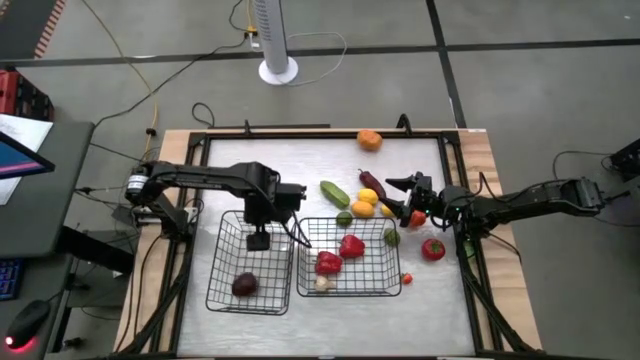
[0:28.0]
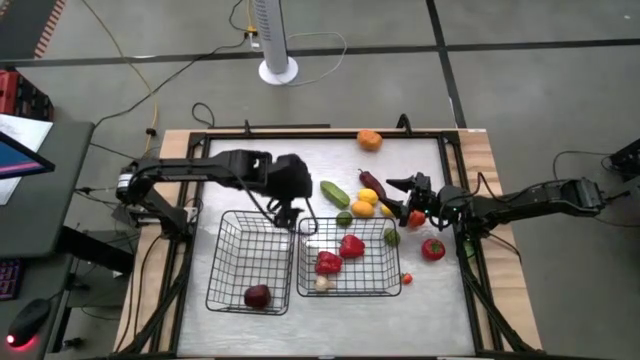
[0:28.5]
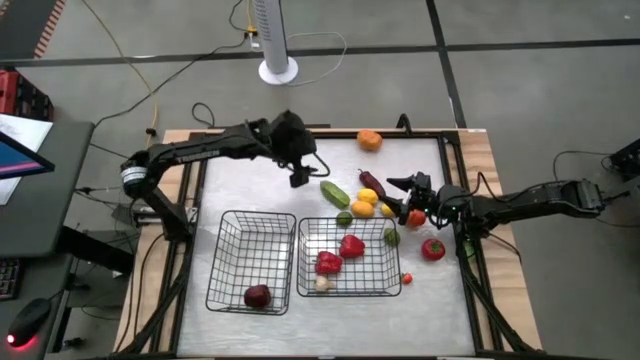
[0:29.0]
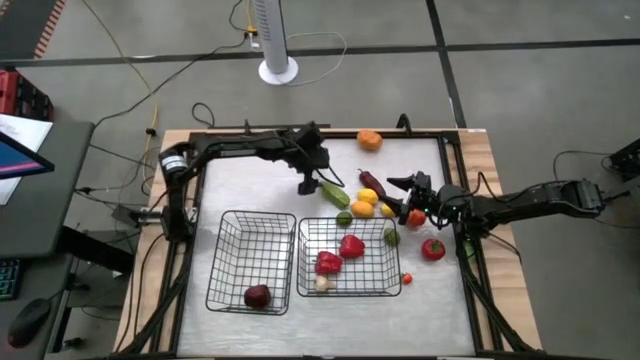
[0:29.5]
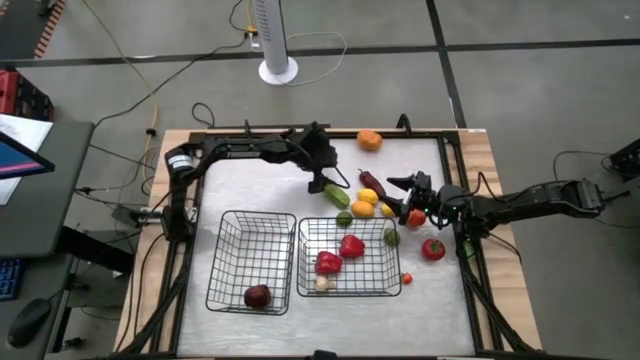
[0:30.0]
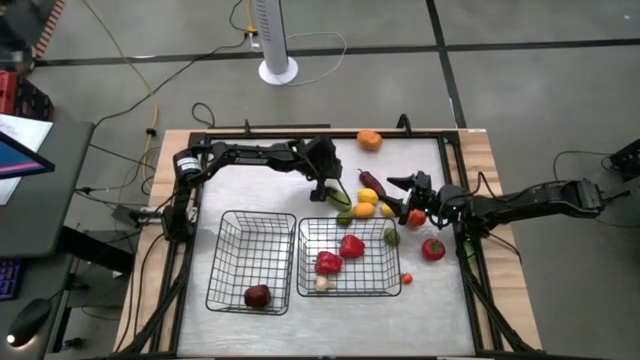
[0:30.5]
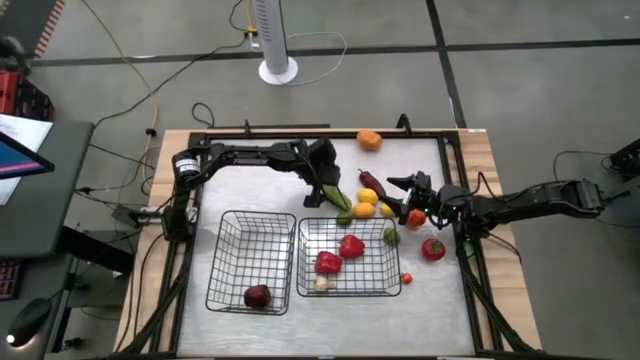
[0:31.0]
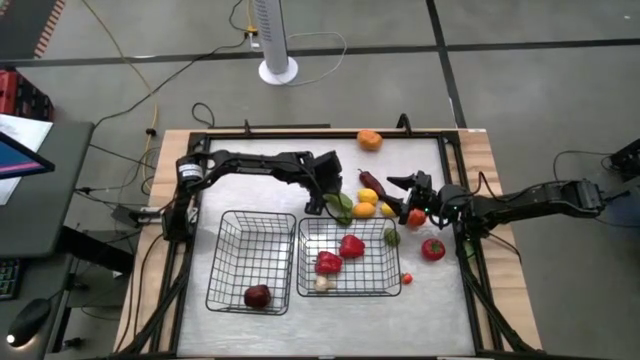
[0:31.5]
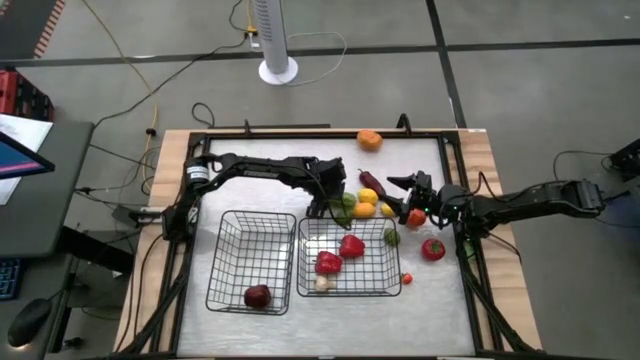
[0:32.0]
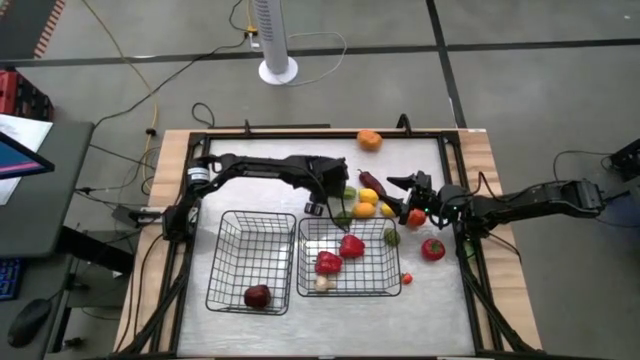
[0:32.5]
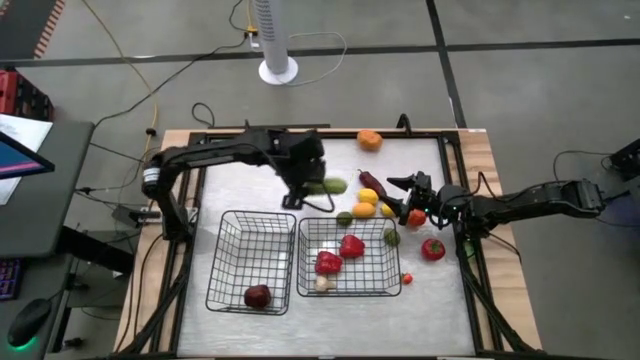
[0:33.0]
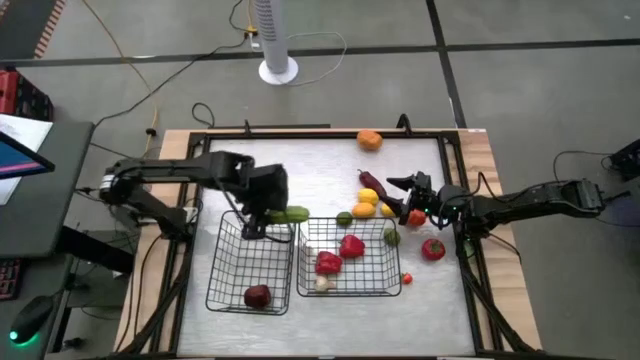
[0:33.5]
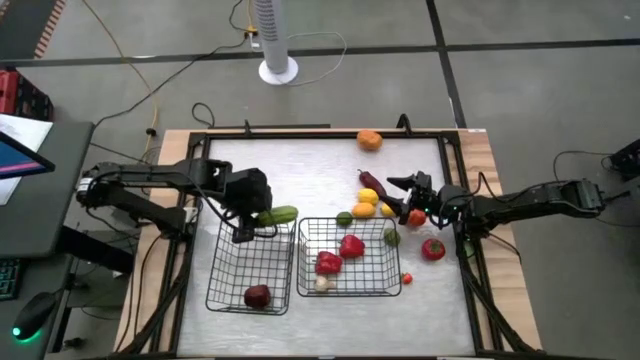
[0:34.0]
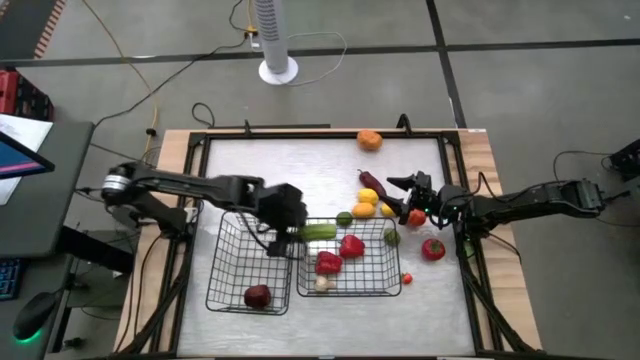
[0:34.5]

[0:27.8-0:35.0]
Task: Sort produce into baskets
Put the cucumber into the right wire basket

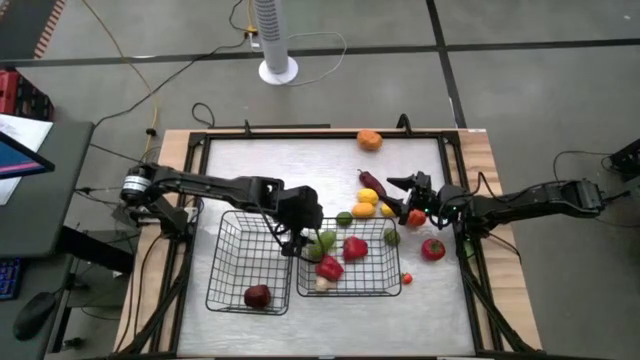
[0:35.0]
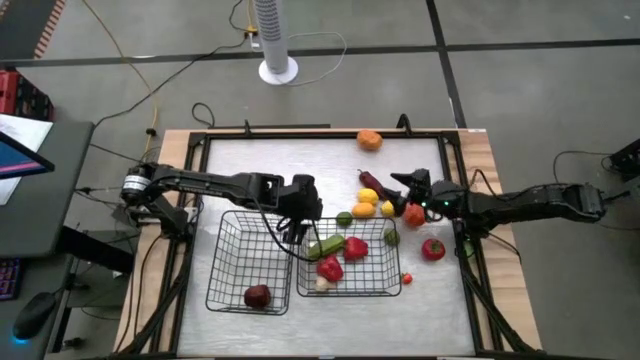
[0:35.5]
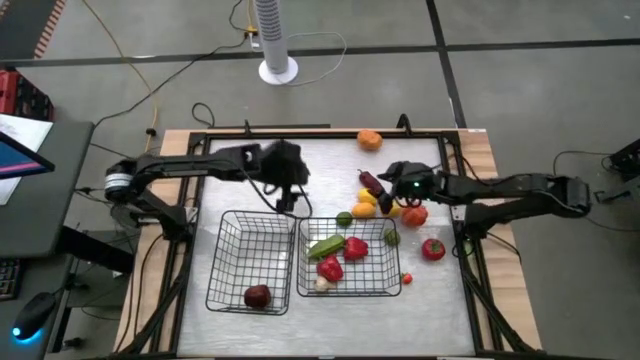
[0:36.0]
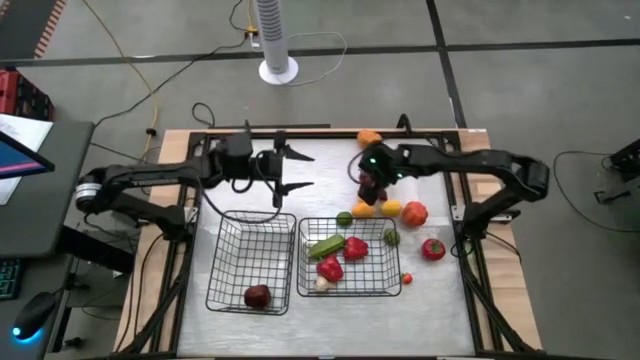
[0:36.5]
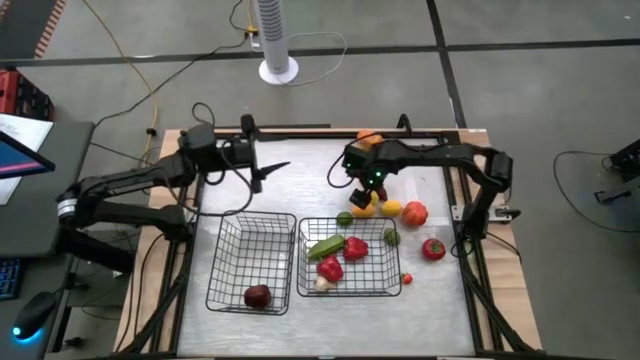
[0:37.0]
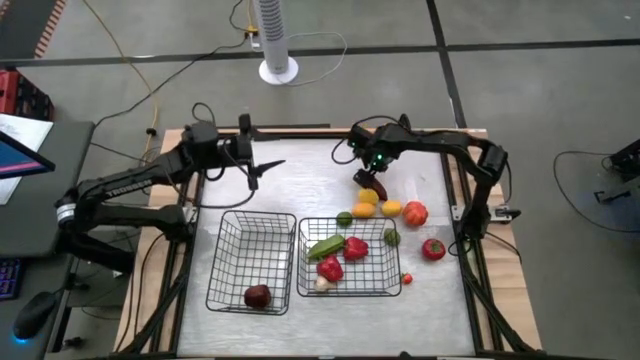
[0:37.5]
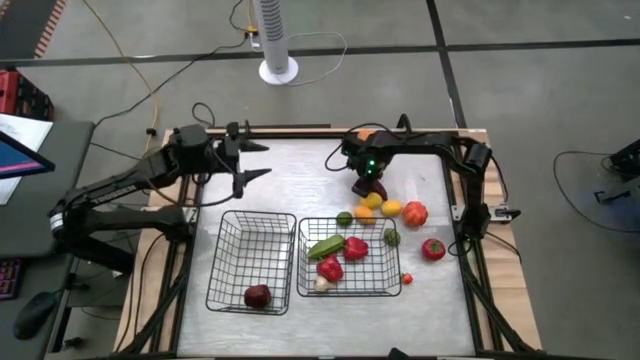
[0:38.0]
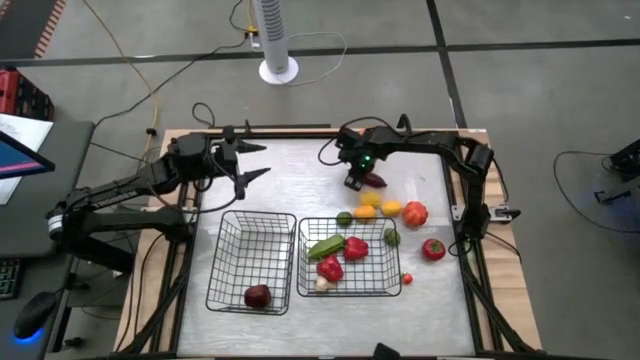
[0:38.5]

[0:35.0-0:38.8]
Put the chili pepper into the right wire basket

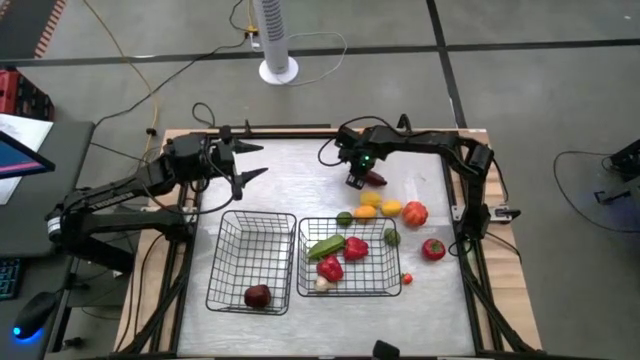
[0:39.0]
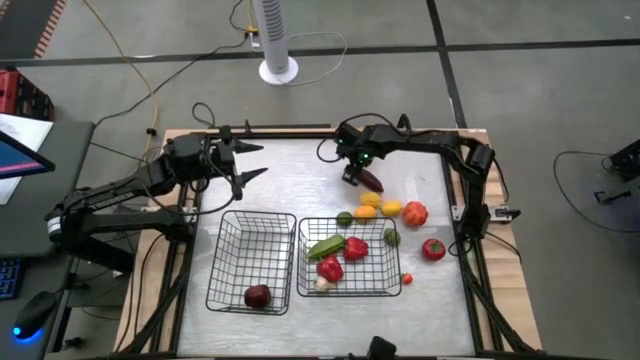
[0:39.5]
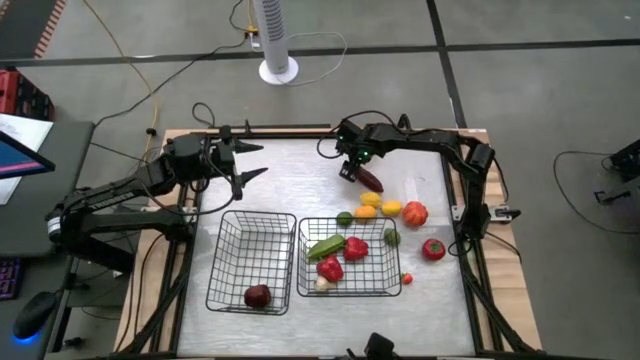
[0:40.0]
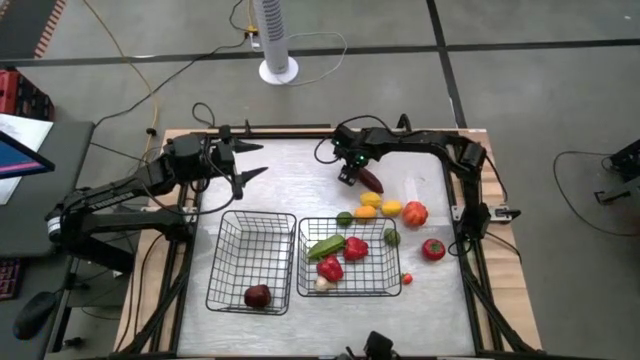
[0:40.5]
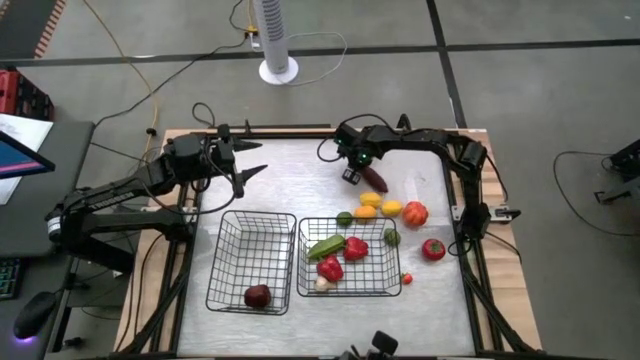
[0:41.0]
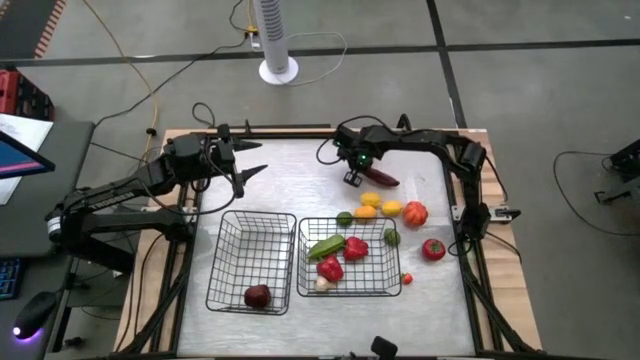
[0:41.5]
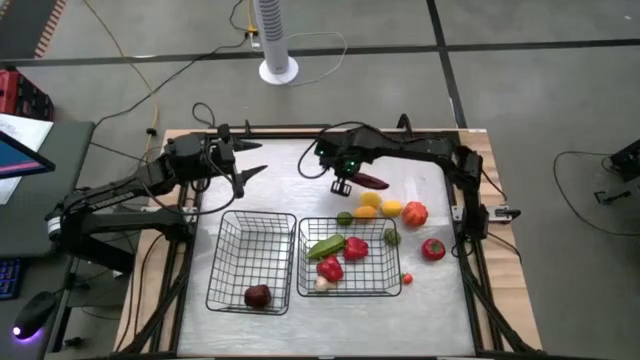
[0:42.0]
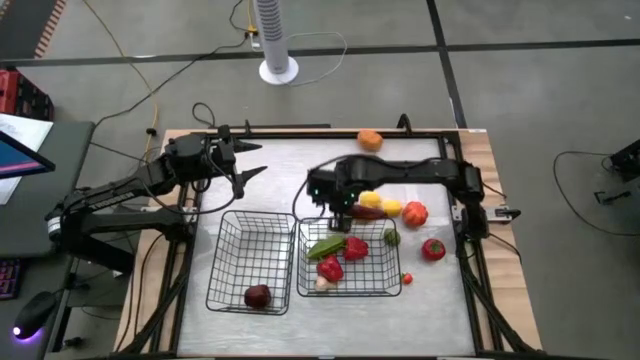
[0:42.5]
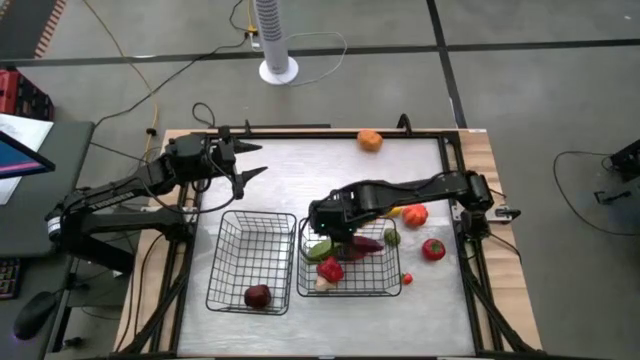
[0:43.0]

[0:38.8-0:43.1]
Put the chili pepper into the right wire basket

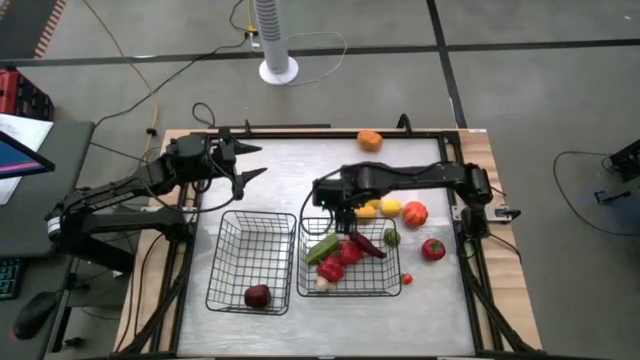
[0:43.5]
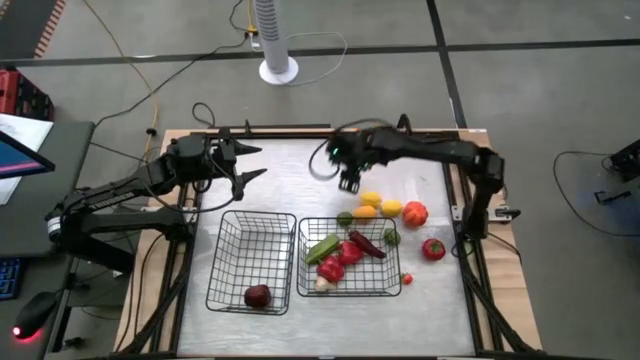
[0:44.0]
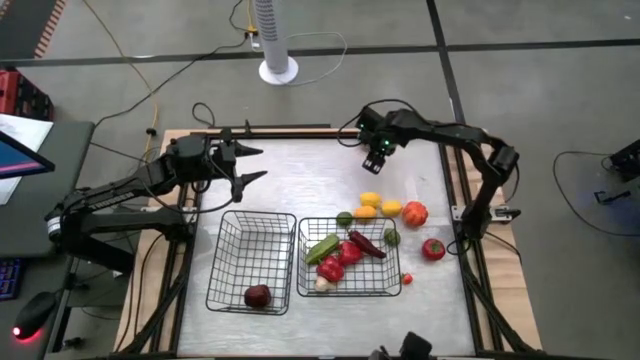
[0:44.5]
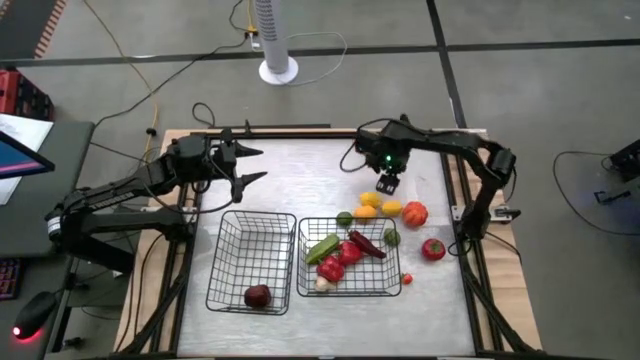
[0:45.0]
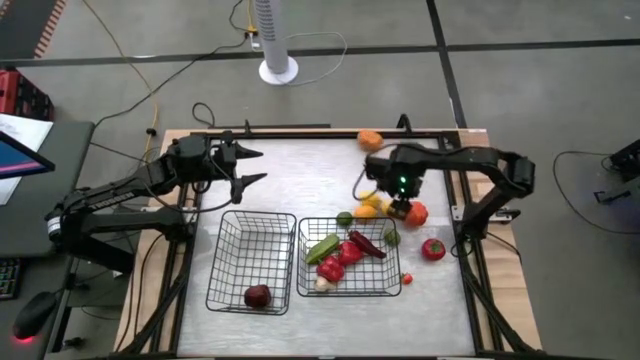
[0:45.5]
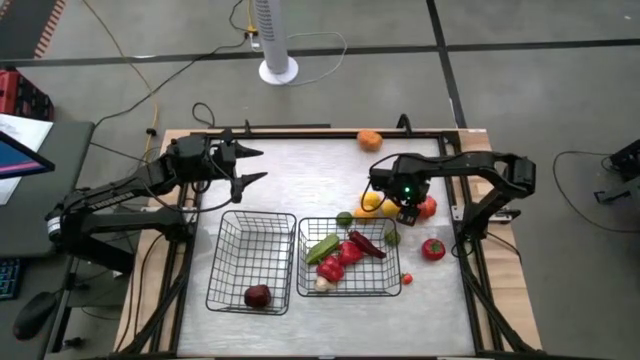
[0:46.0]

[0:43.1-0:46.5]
Put the pumpkin into the right wire basket

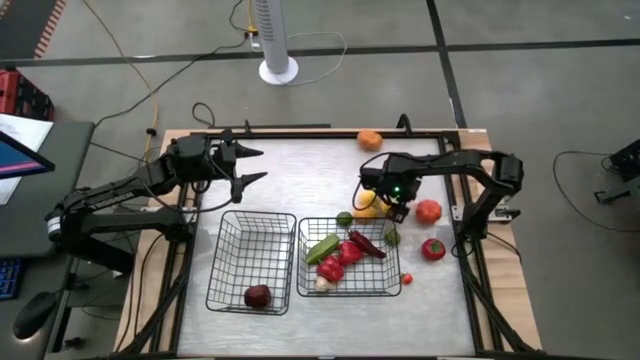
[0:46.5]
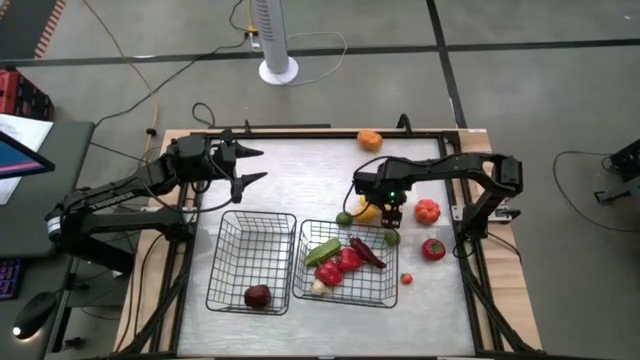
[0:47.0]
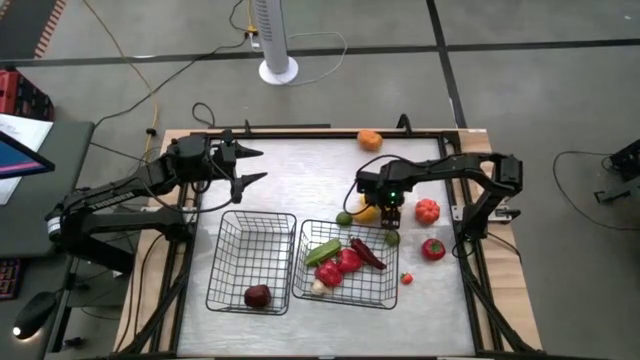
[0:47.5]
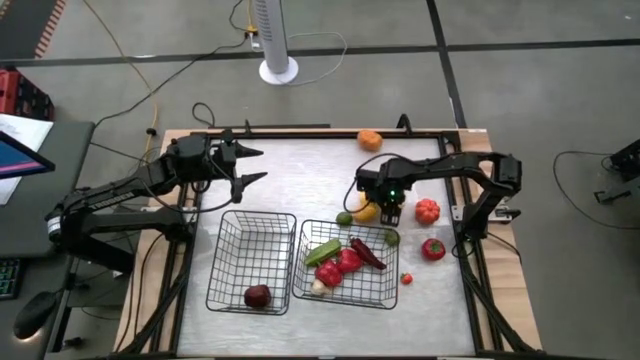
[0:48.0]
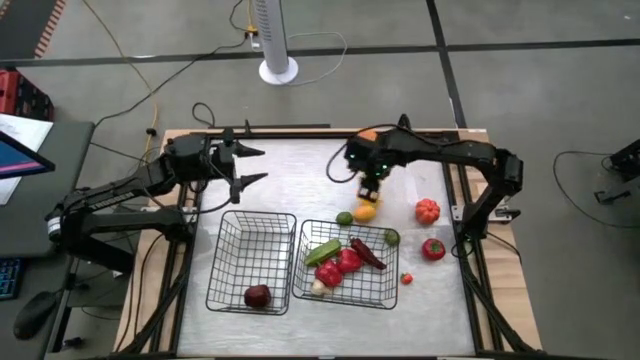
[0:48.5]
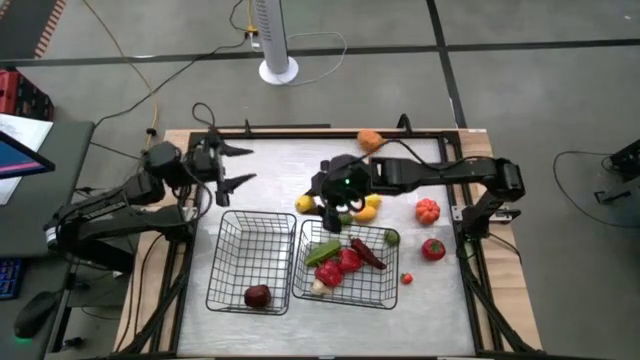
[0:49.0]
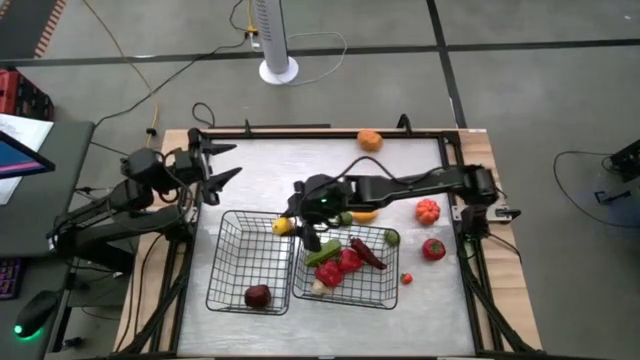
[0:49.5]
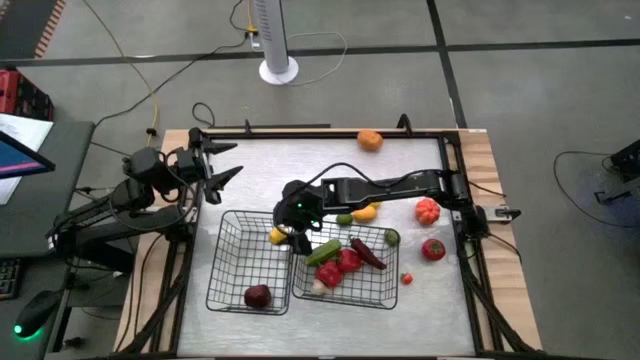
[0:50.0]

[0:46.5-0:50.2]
Put the right lemon into the left wire basket
